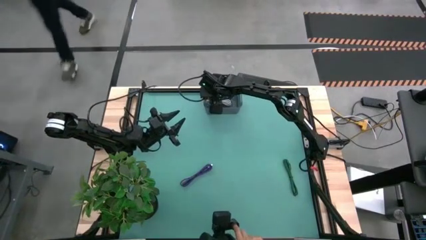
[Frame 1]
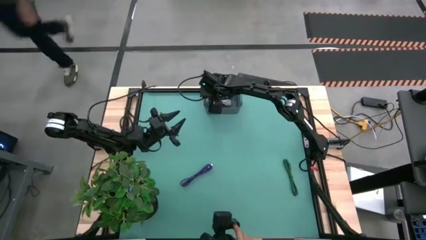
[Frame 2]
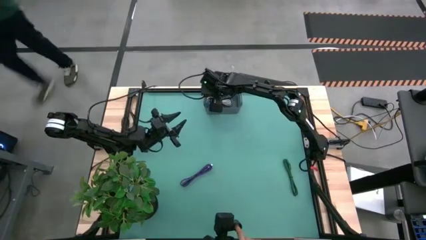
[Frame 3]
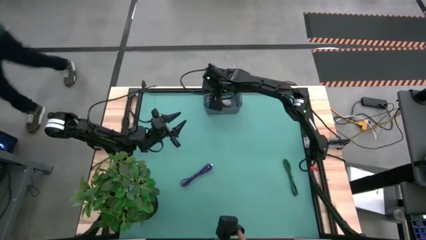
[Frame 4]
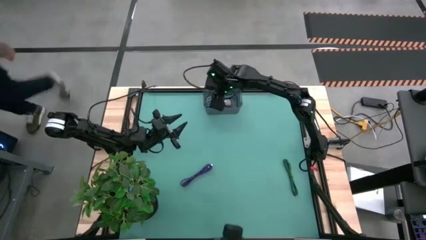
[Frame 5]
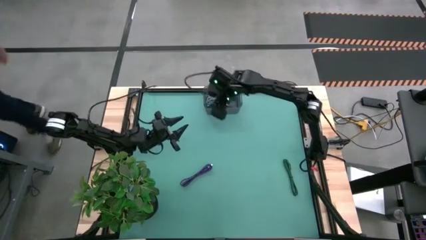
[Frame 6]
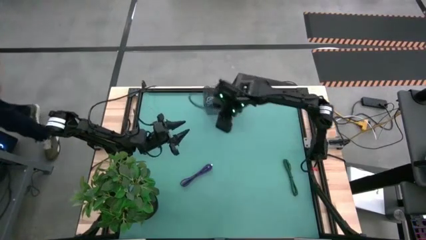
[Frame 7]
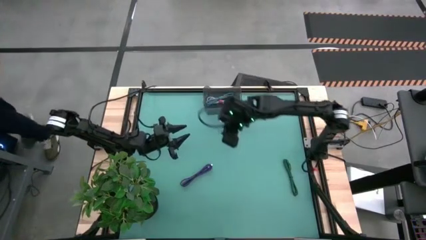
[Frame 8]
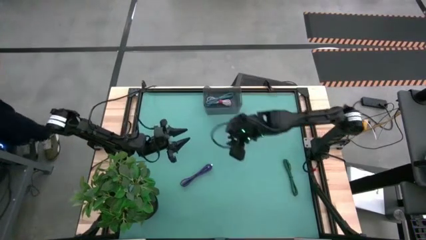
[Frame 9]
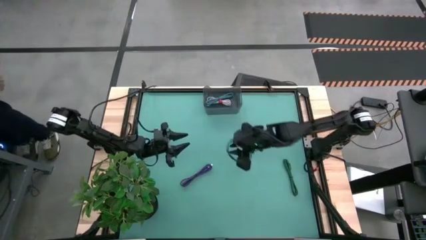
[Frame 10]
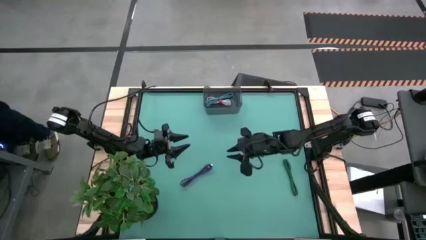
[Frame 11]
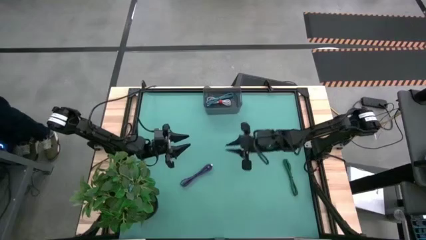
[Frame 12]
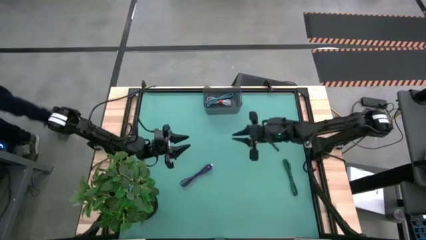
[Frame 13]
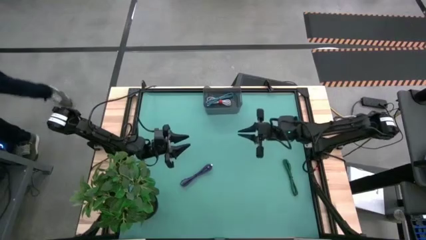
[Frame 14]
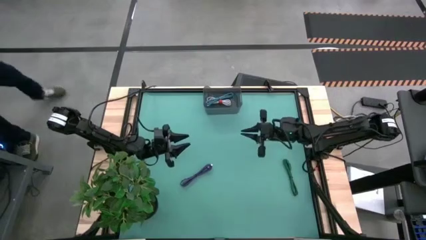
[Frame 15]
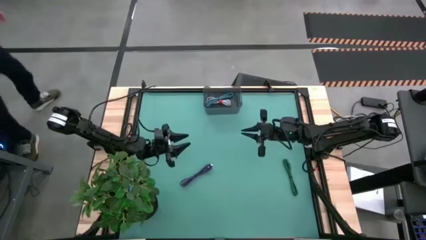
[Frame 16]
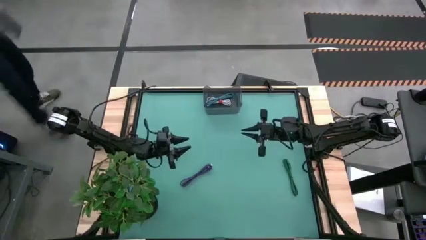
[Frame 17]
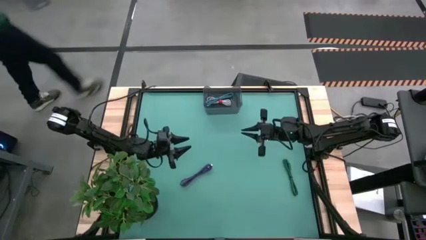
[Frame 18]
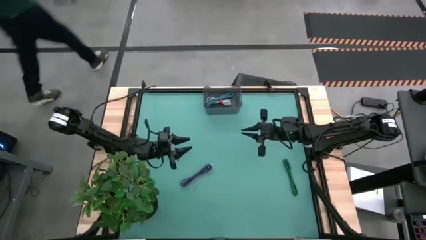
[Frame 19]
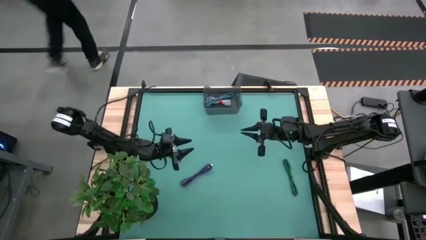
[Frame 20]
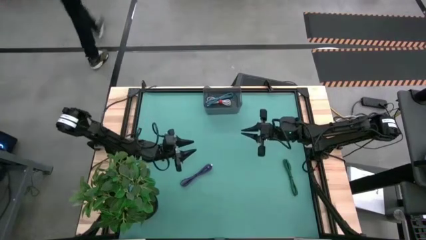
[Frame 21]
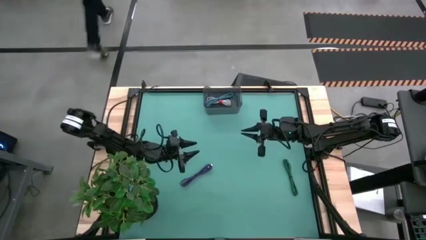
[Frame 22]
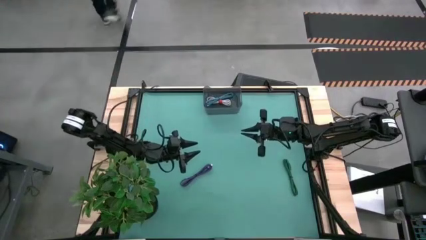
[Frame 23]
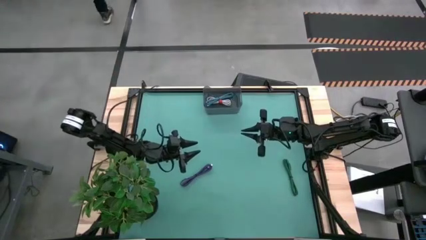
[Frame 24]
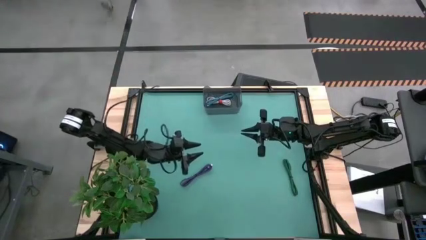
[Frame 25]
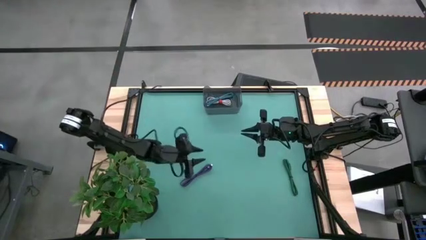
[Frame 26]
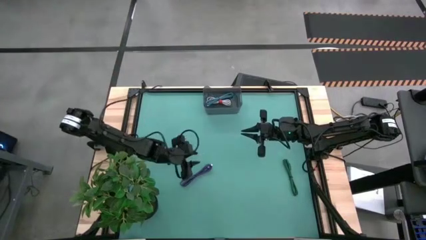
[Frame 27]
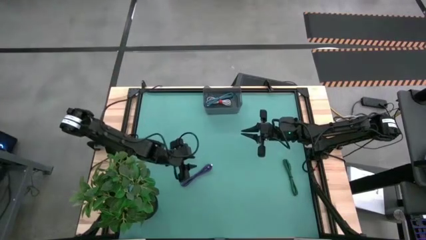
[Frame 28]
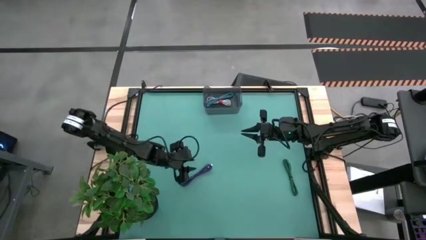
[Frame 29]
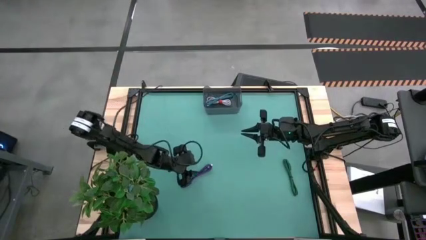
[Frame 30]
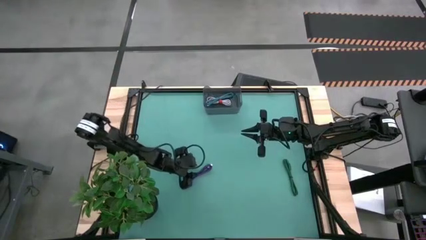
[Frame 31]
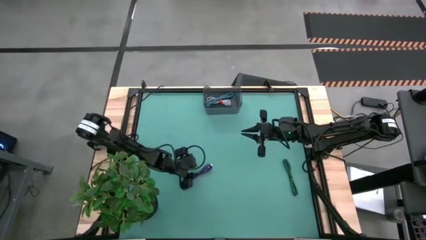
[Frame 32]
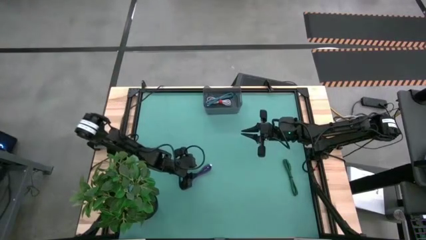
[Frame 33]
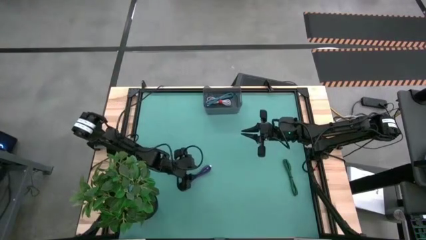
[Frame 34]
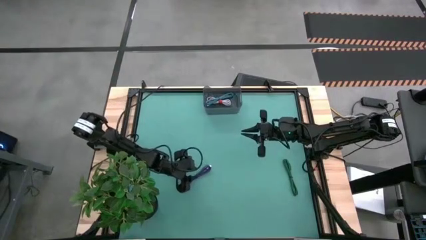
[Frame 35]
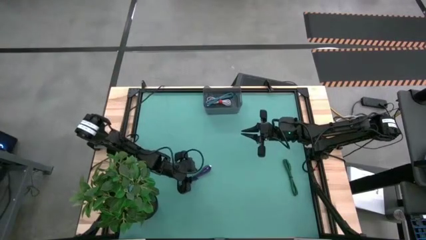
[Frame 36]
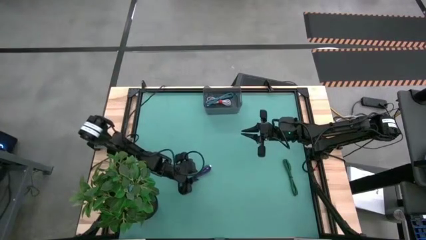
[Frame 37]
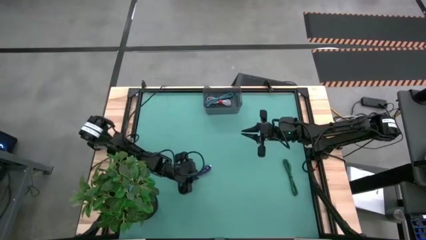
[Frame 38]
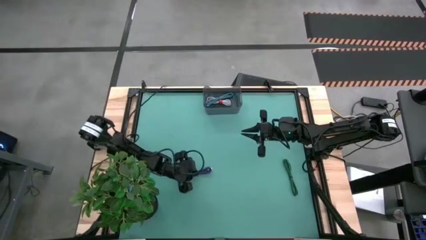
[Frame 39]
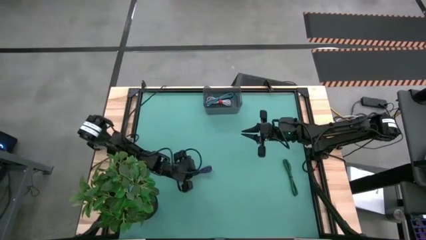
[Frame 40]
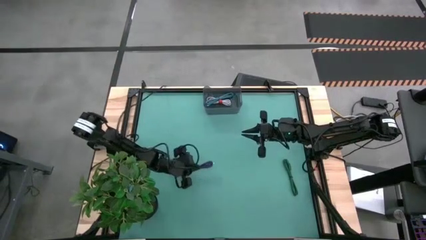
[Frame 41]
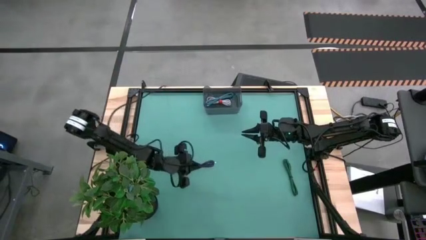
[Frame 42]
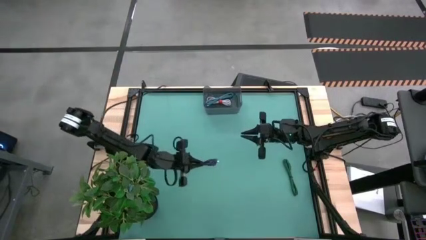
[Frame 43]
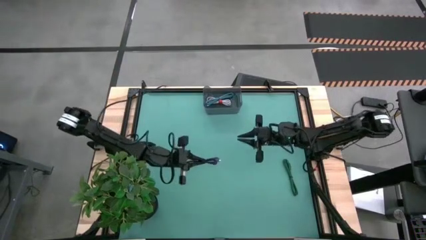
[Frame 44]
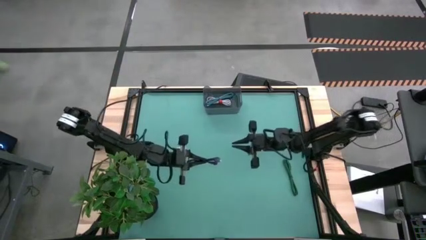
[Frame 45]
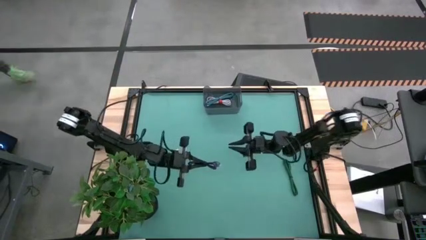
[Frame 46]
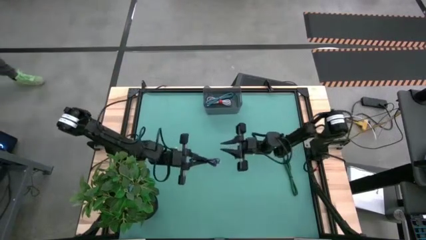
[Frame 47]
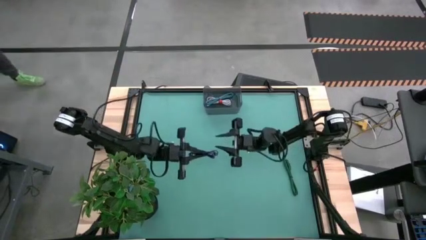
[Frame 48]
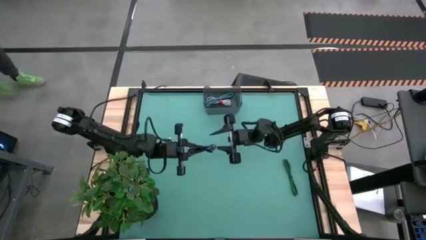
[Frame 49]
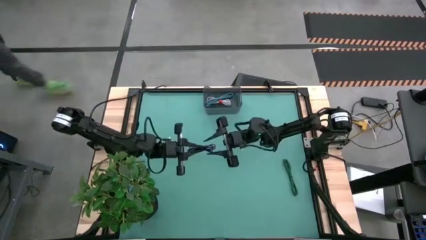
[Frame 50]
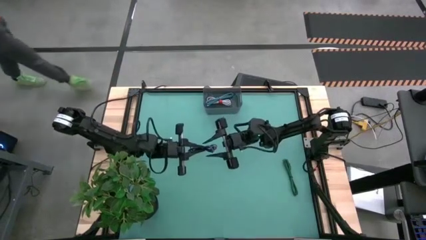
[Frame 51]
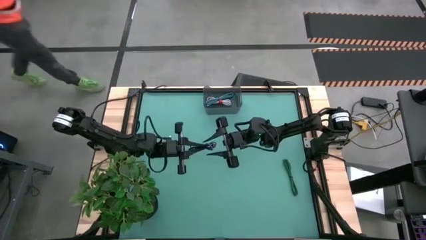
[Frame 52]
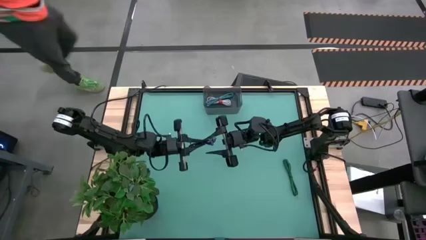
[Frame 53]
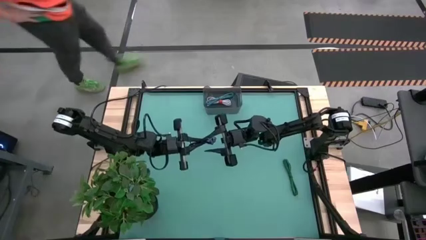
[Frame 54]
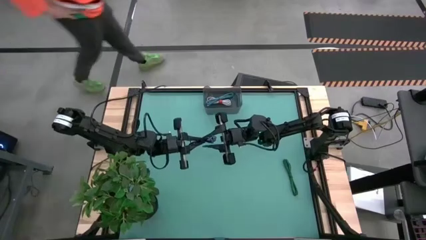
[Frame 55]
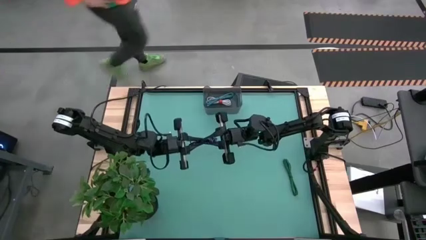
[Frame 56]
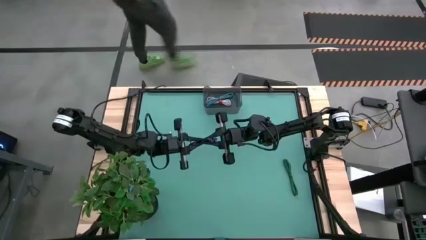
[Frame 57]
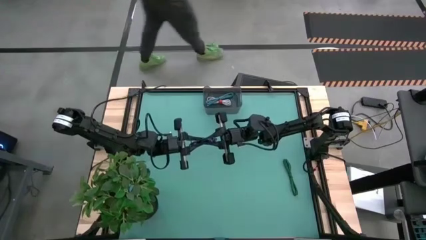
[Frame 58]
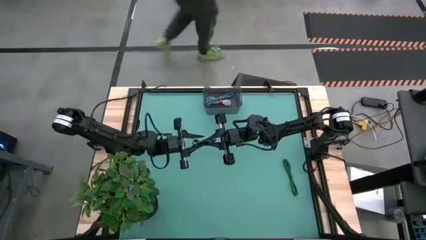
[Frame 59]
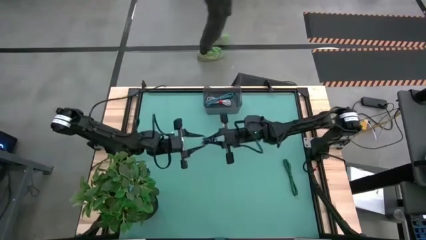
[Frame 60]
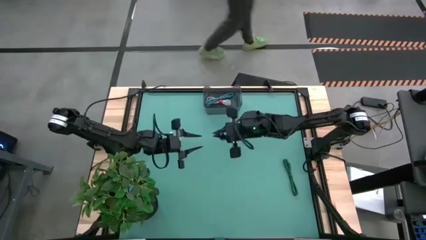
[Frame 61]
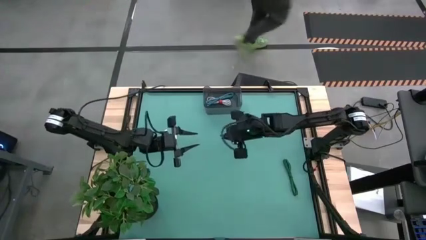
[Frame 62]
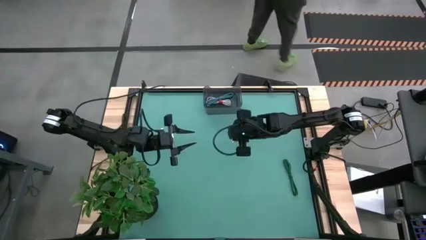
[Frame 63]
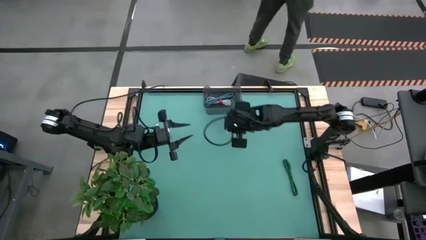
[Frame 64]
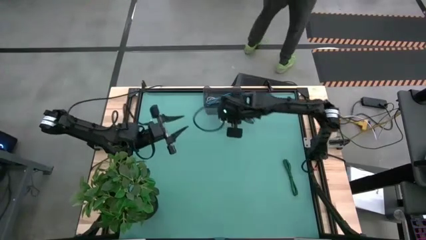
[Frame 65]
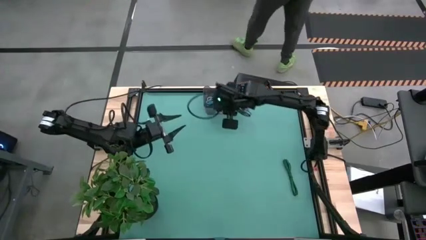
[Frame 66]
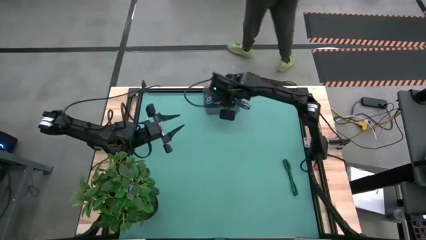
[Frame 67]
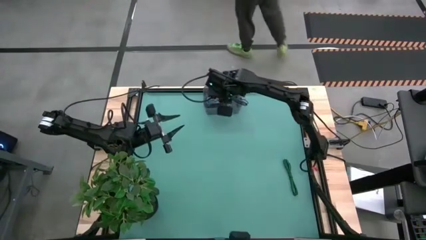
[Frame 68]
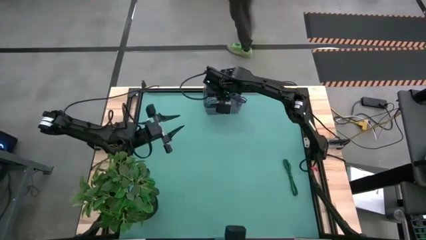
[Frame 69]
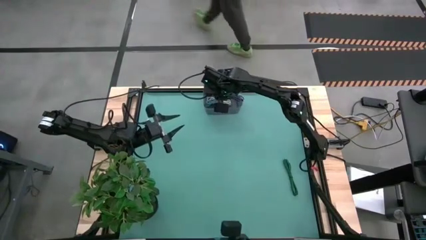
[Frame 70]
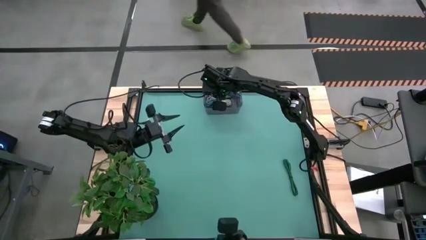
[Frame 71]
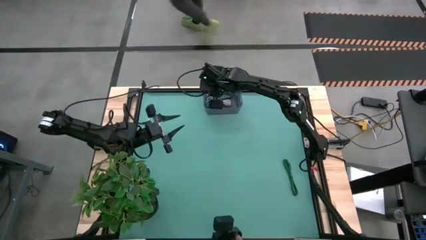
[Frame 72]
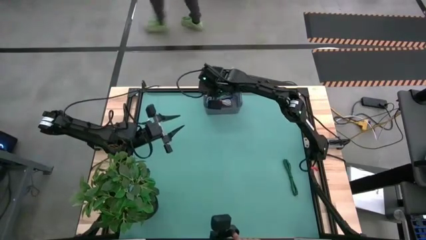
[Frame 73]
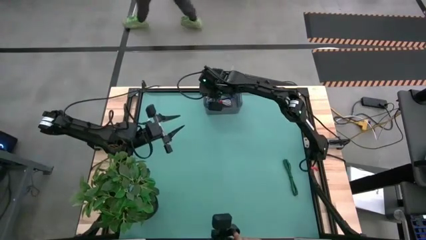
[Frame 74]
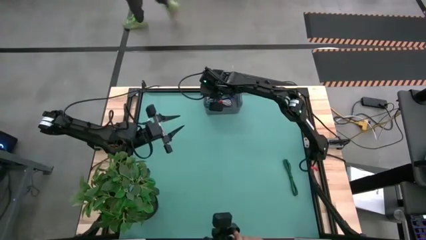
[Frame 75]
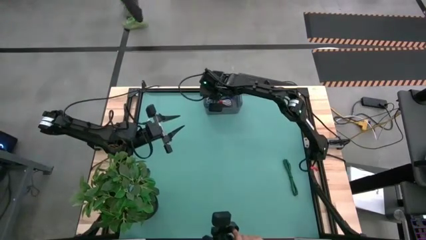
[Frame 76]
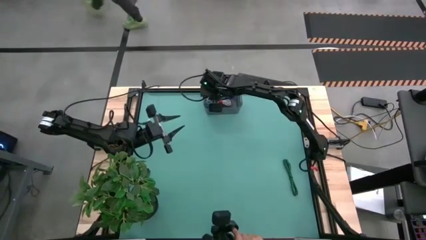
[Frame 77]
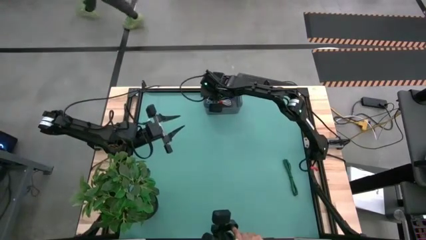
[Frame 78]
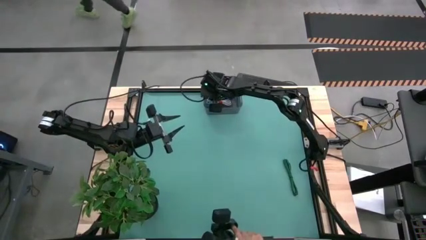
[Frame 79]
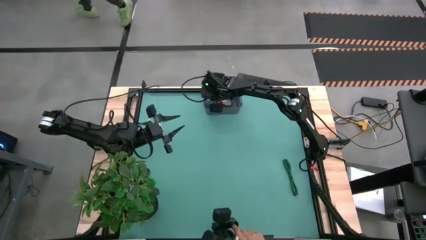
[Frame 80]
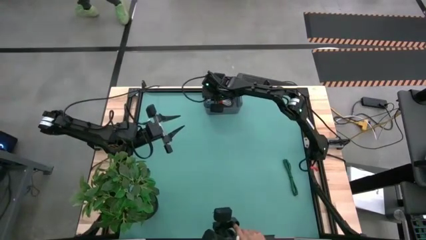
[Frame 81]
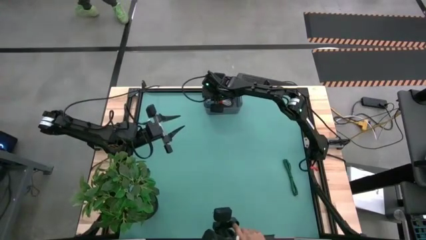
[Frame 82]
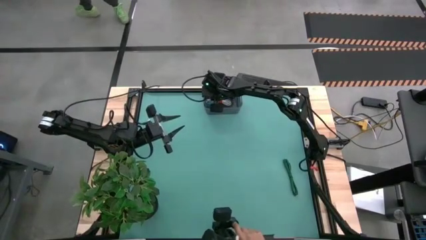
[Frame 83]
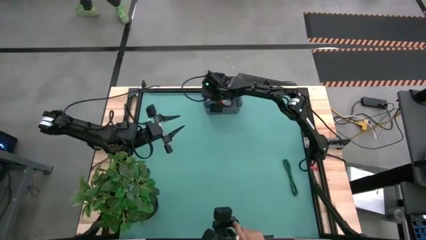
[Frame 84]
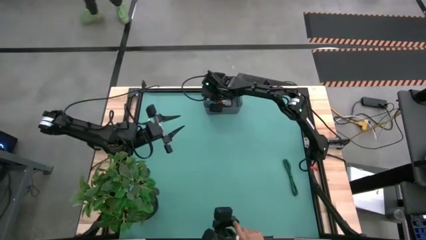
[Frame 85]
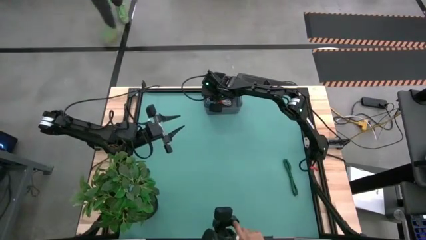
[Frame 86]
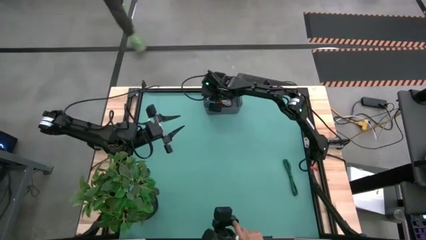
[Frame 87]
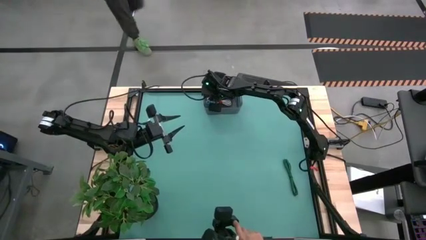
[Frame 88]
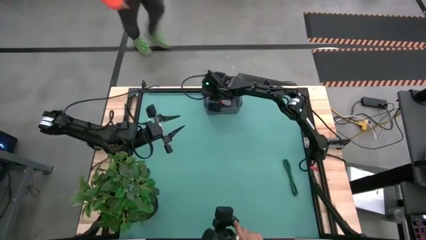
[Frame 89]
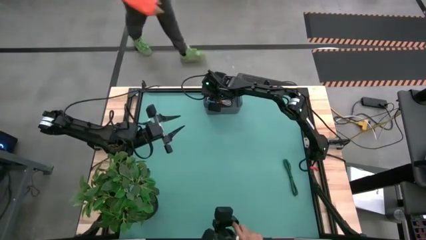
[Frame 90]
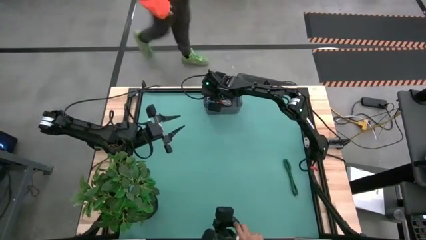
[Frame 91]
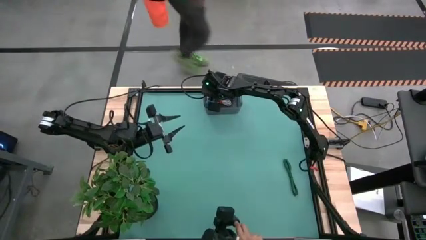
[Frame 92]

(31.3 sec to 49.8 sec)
Task: Pick and place USB-C Cables
Put the violet charger cable into the black container
